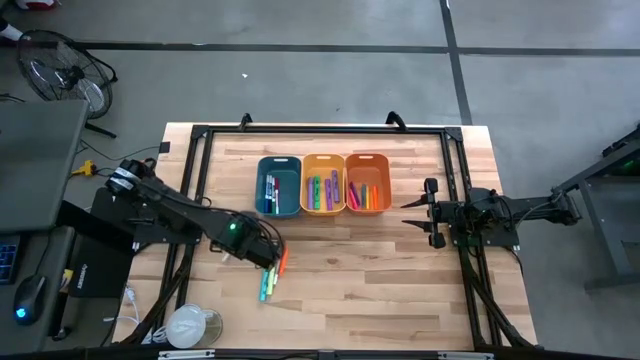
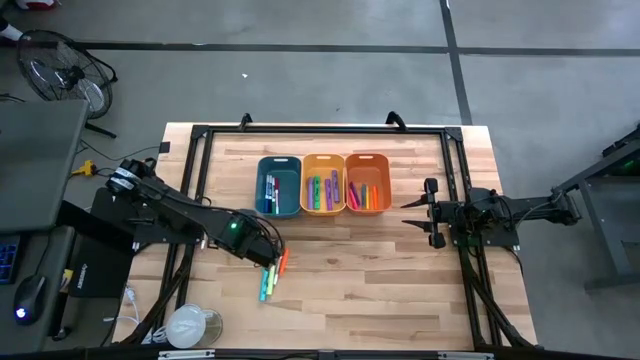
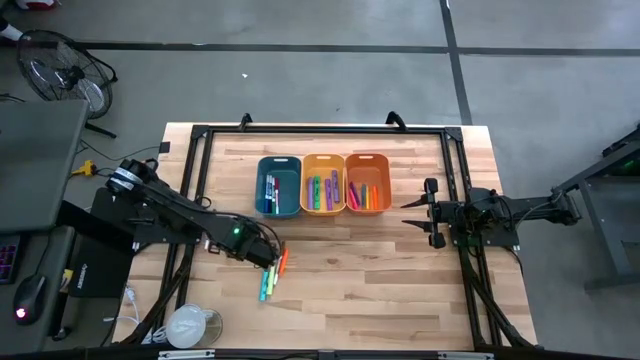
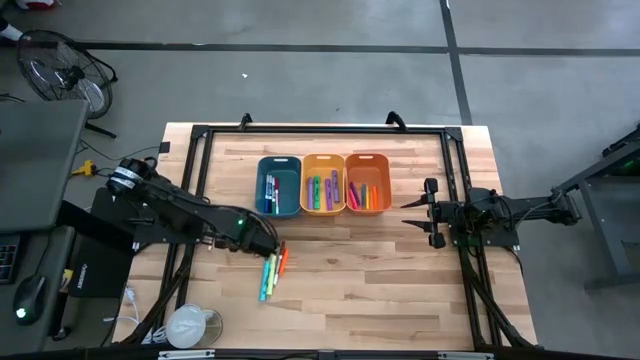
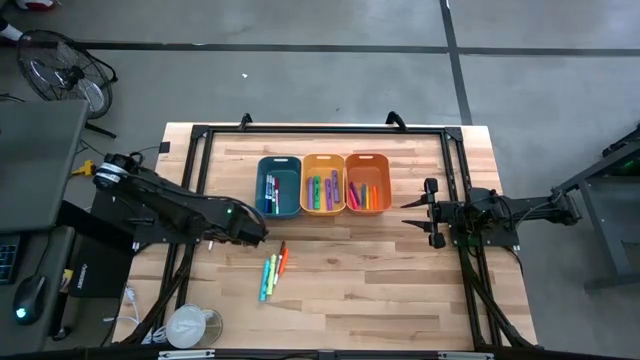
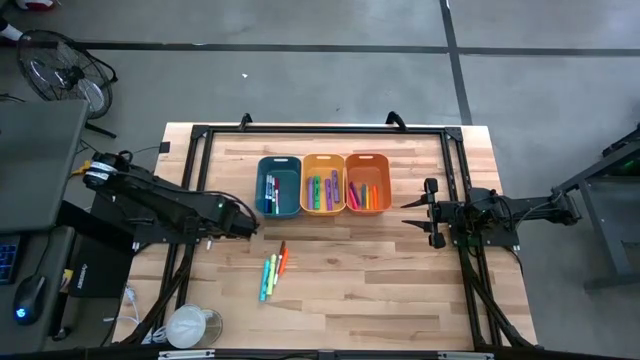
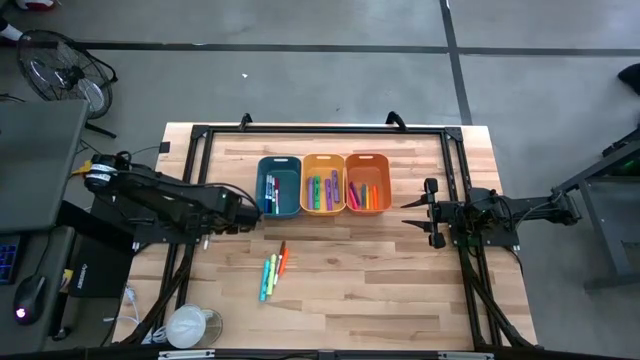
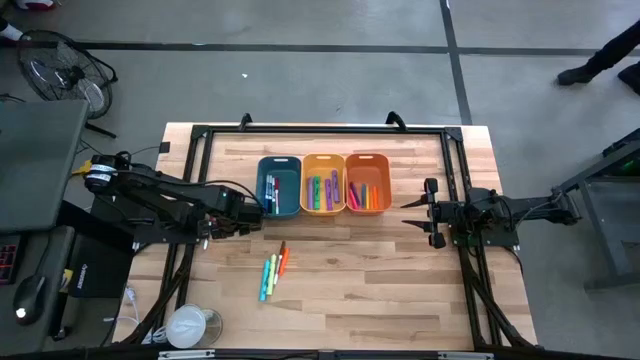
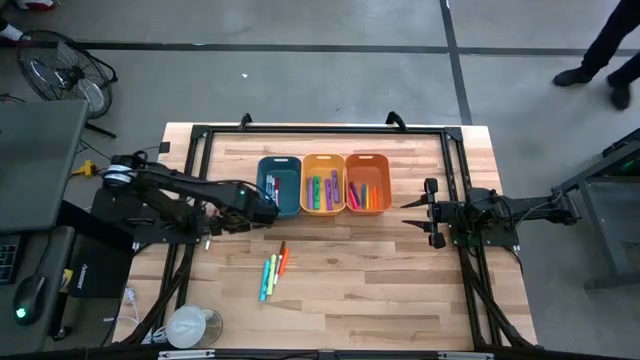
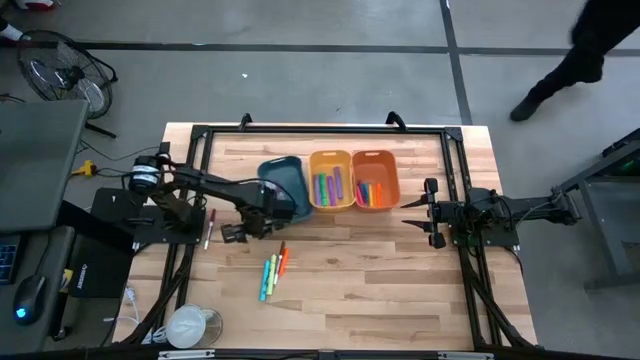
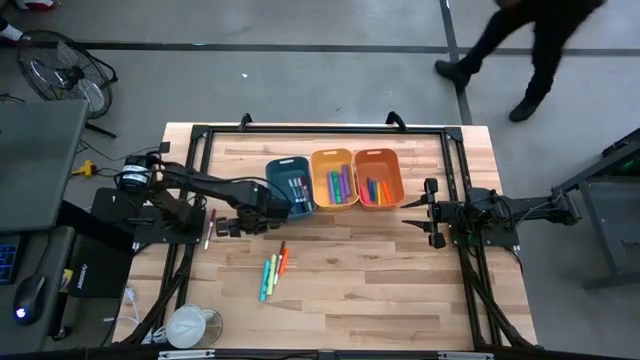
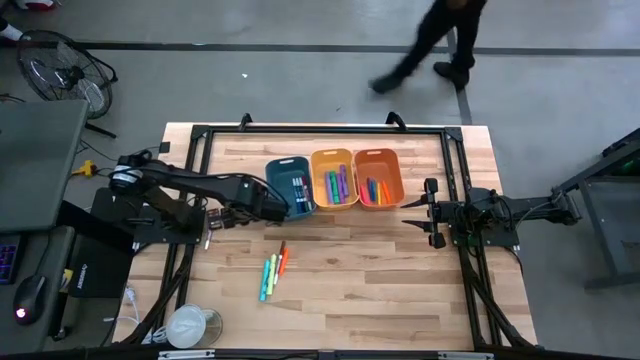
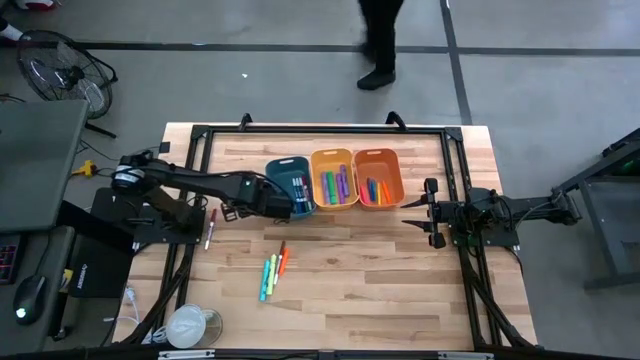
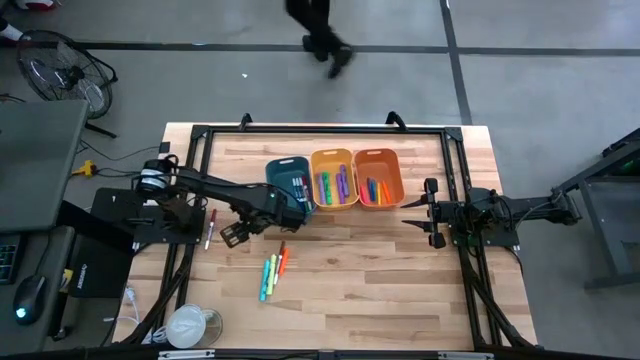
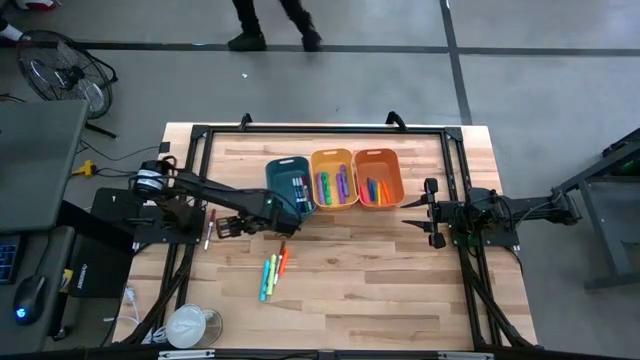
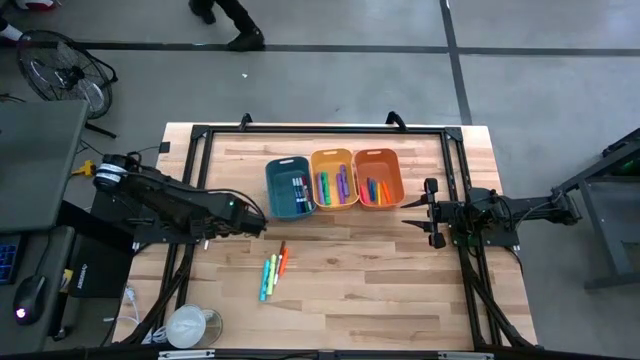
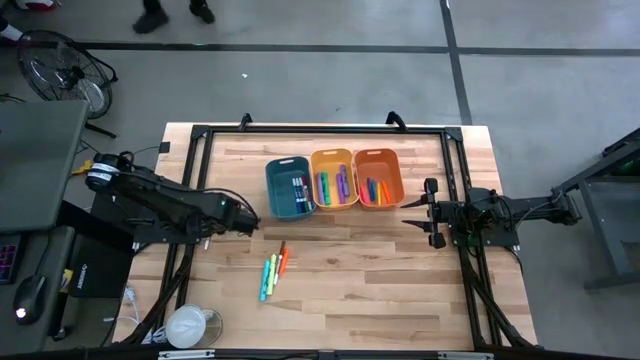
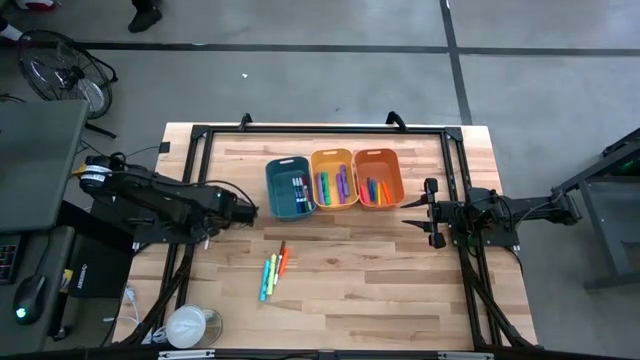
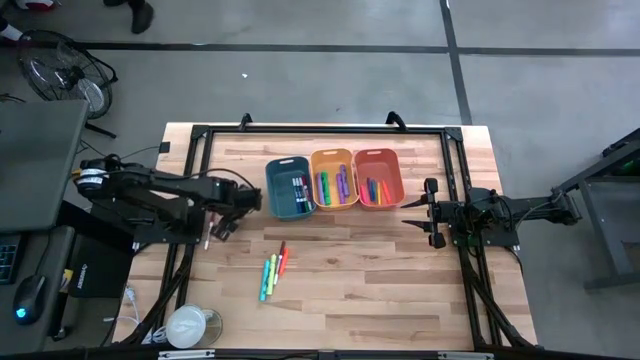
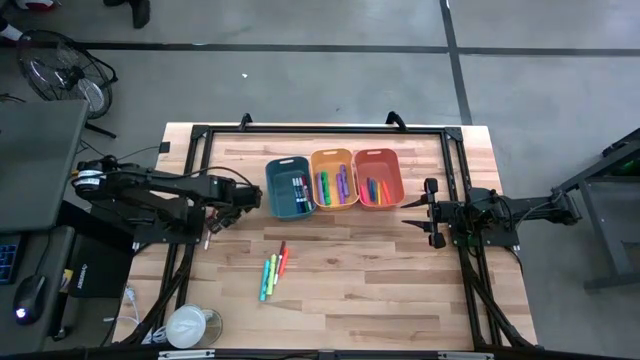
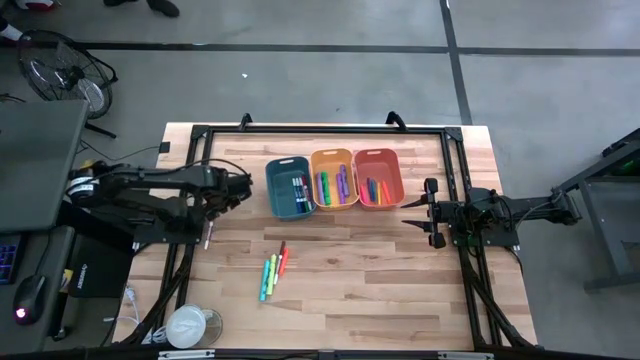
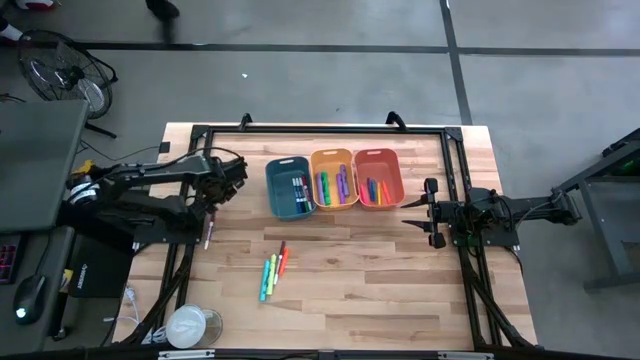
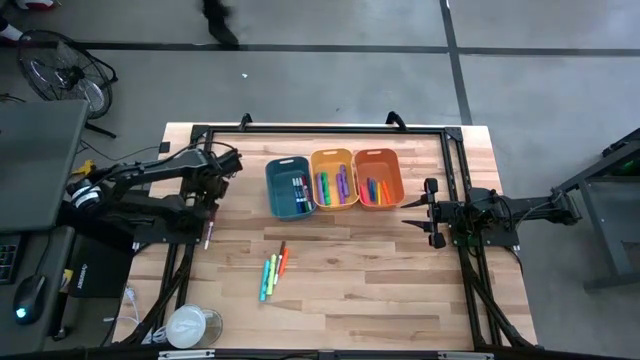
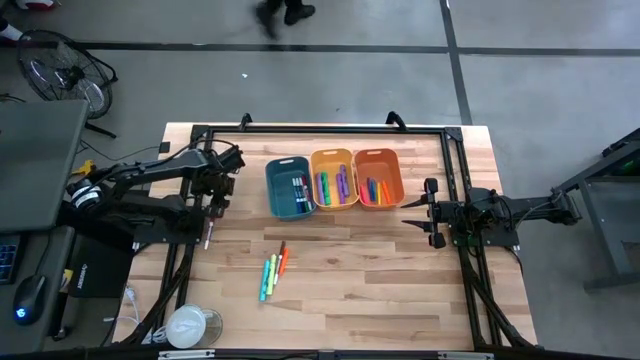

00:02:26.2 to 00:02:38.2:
Task: Pick & Place Markers
Put the dark red marker pen into the blue bin

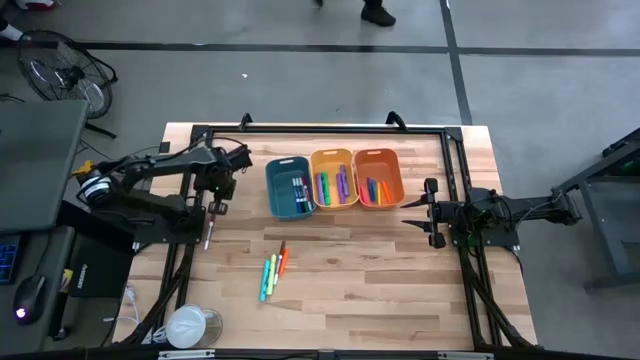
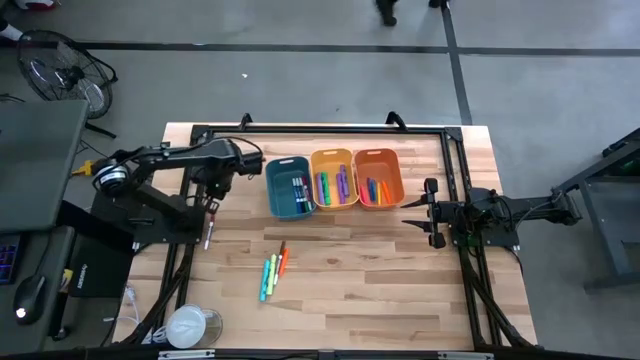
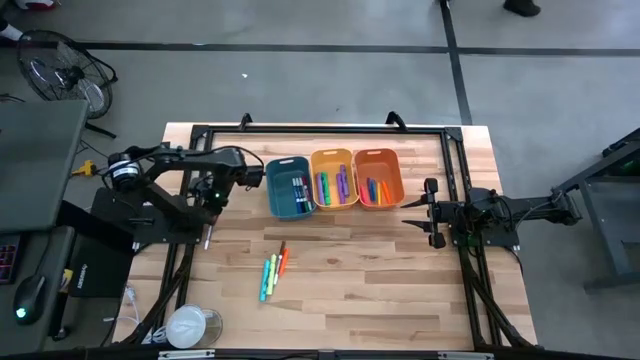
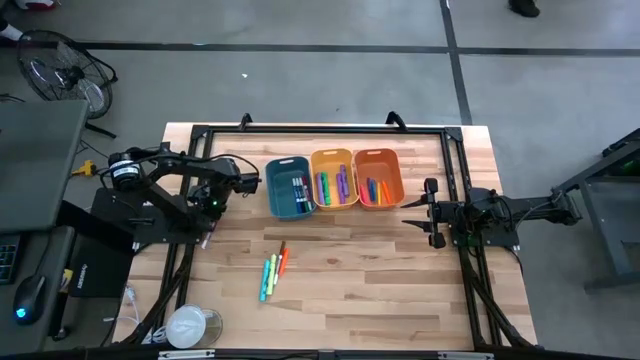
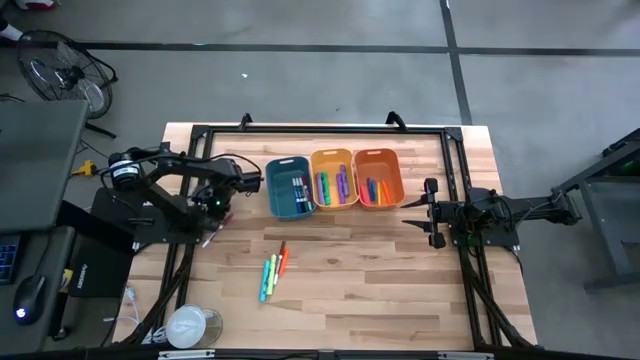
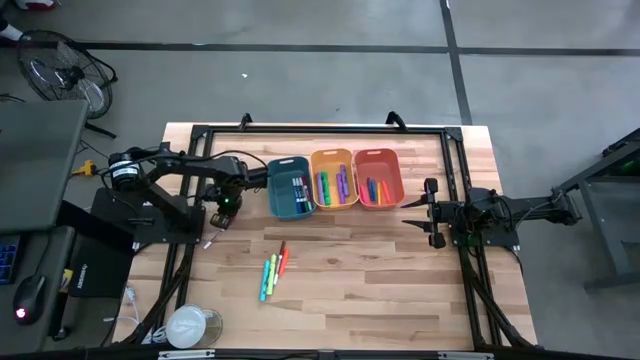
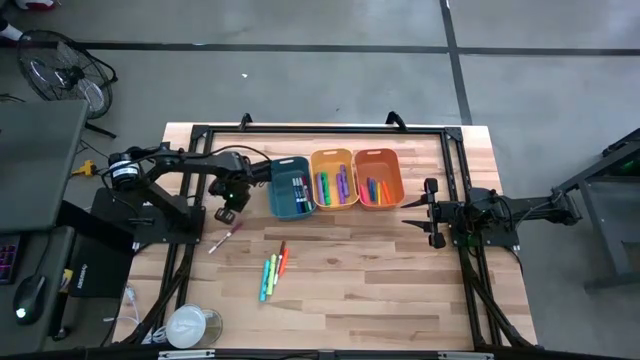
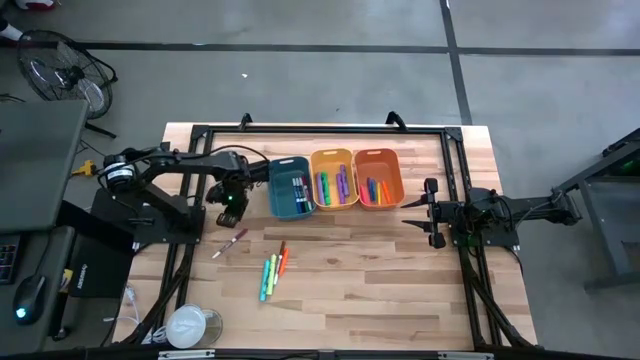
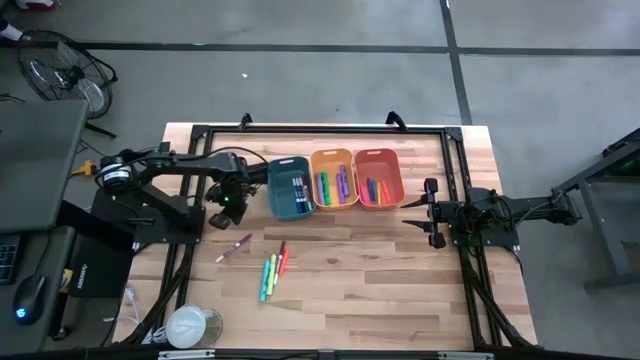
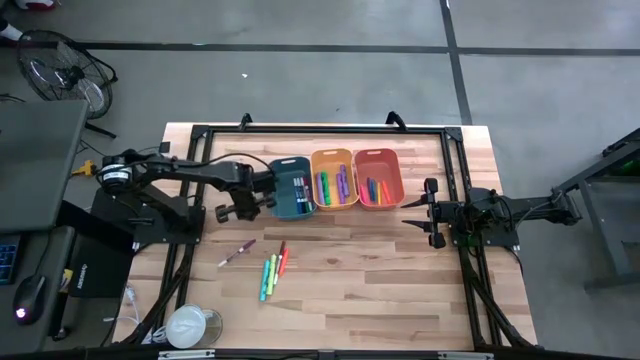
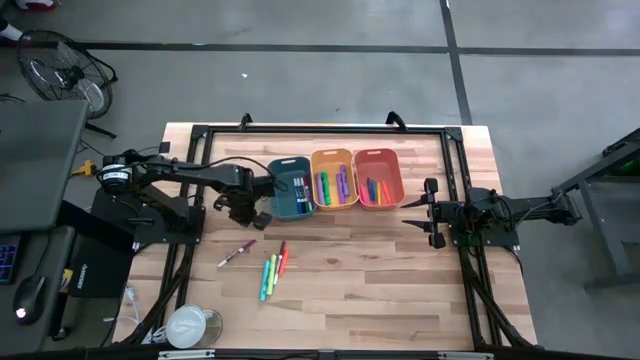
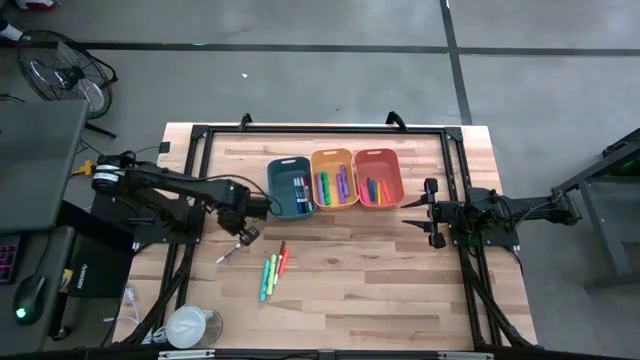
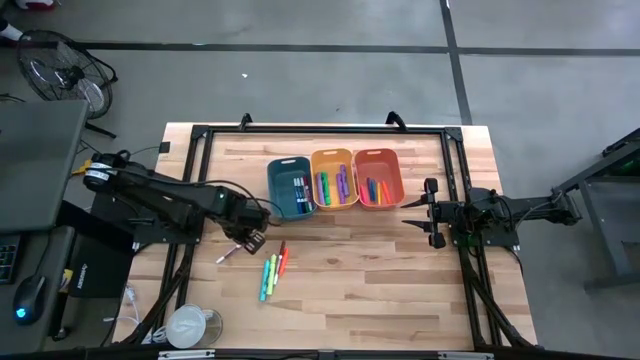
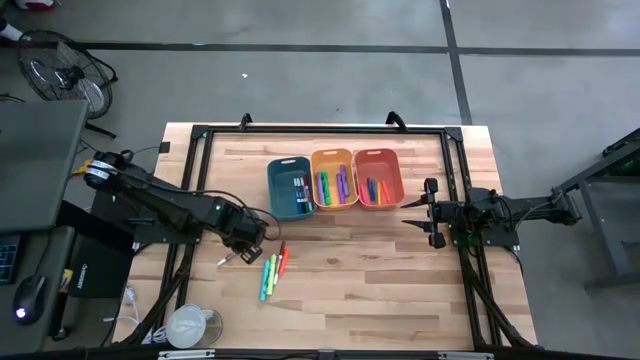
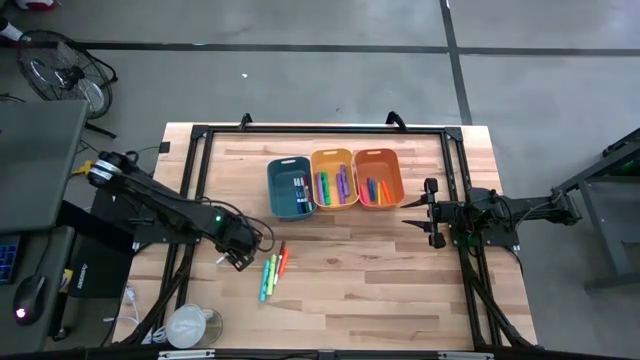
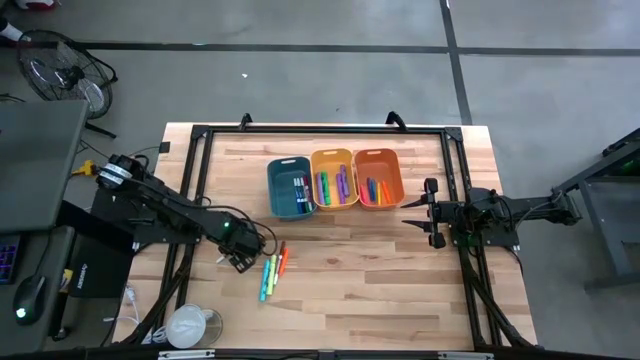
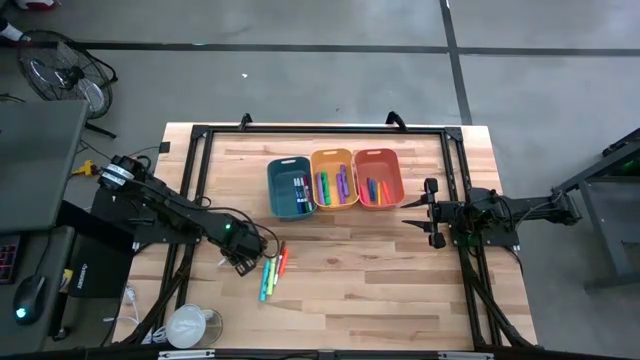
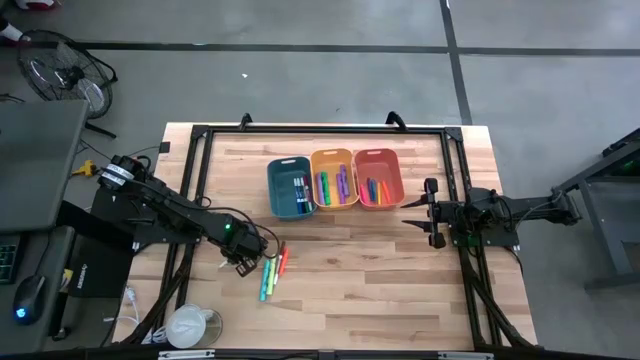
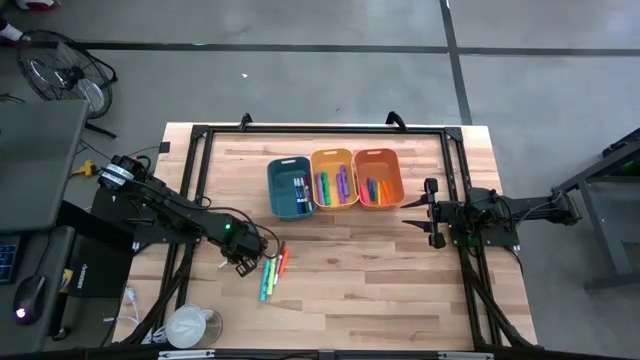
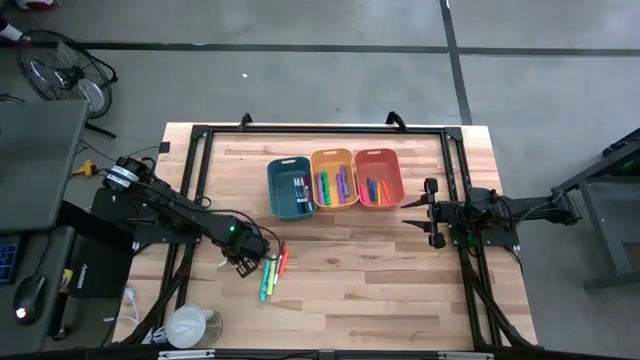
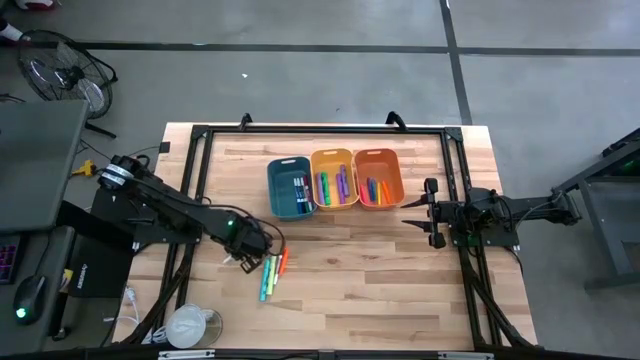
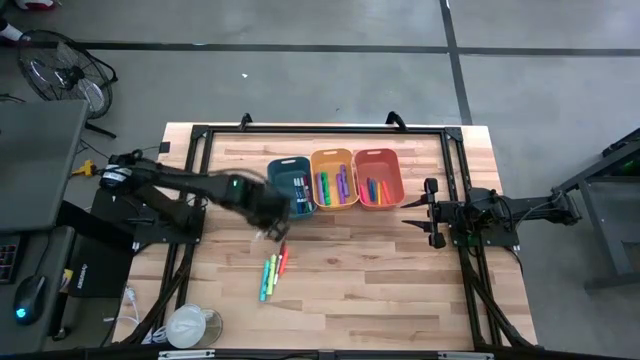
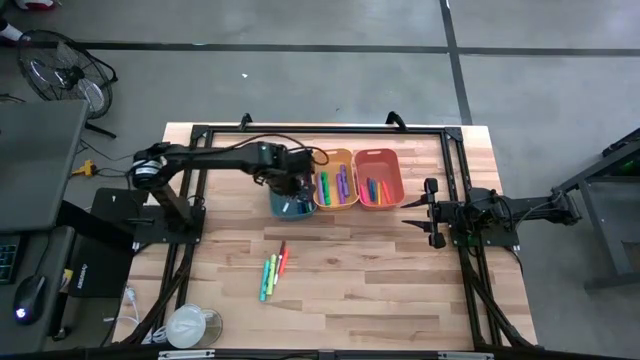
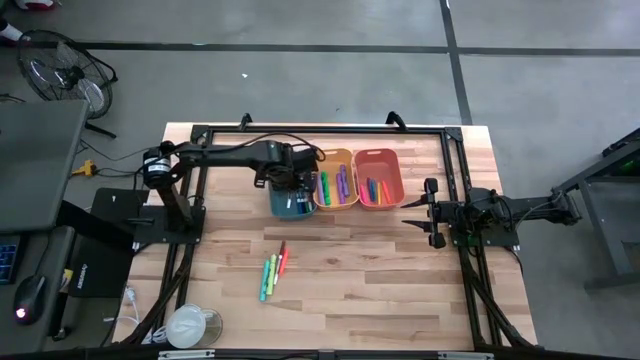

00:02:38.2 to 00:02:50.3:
Put the dark red marker pen into the blue bin
